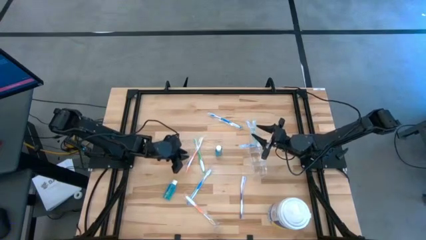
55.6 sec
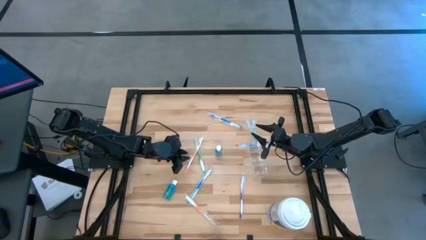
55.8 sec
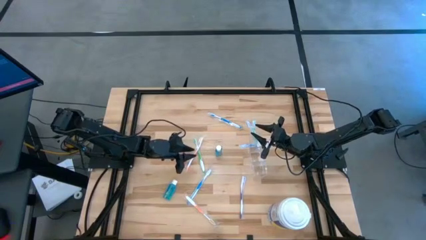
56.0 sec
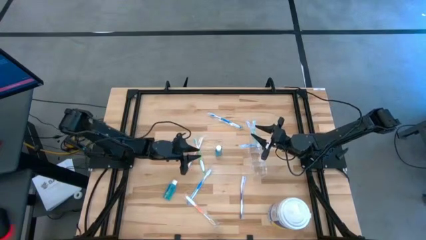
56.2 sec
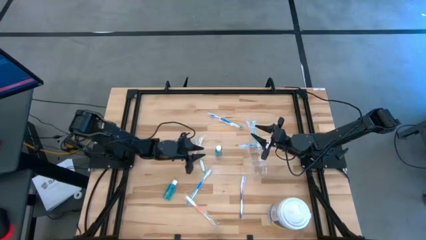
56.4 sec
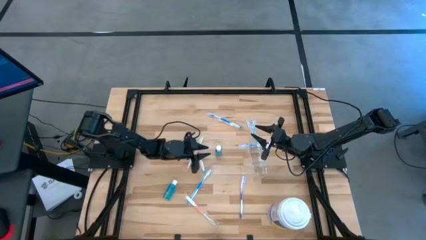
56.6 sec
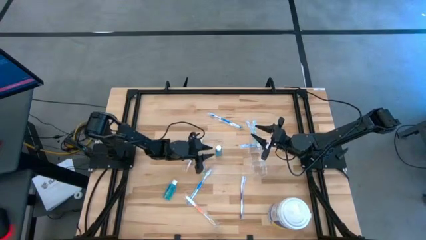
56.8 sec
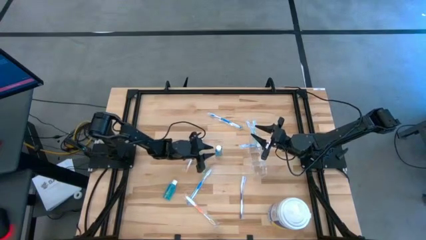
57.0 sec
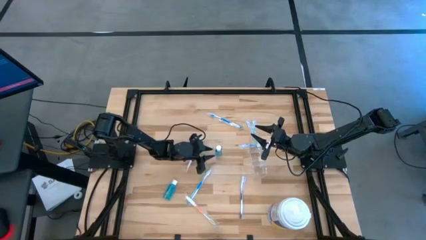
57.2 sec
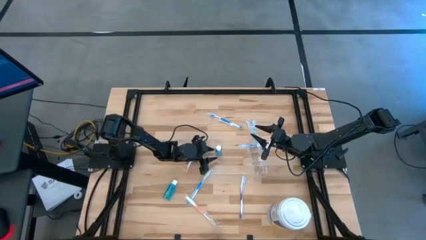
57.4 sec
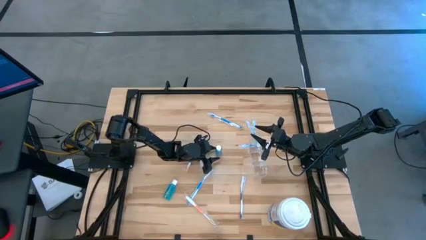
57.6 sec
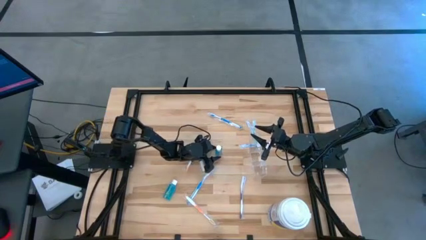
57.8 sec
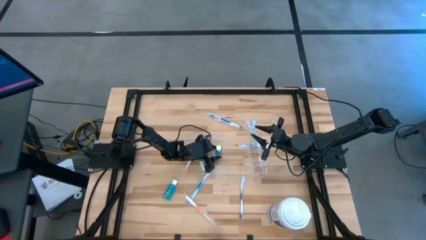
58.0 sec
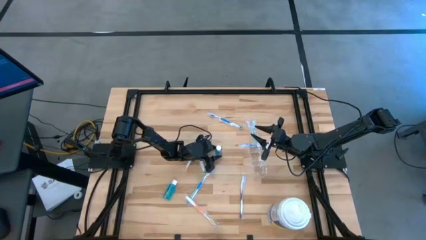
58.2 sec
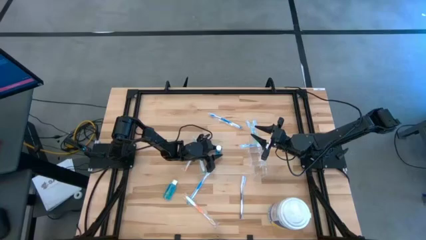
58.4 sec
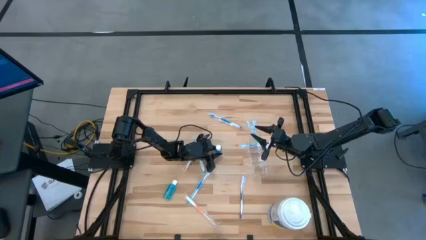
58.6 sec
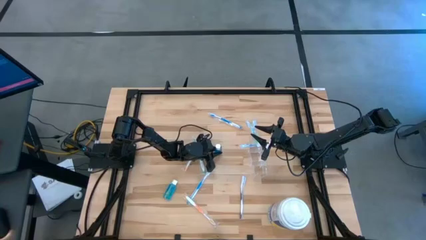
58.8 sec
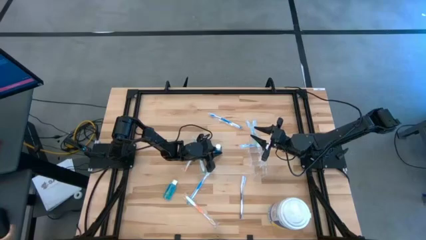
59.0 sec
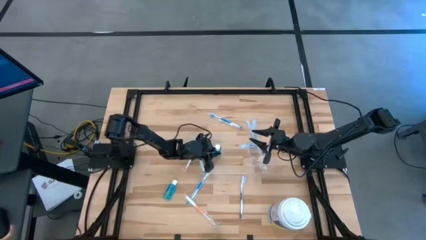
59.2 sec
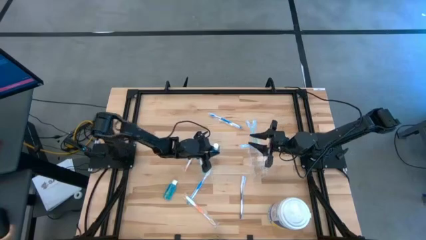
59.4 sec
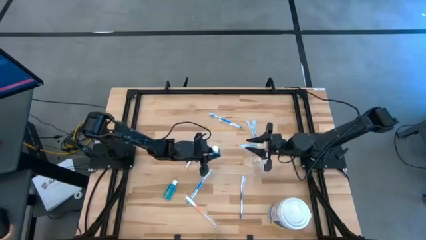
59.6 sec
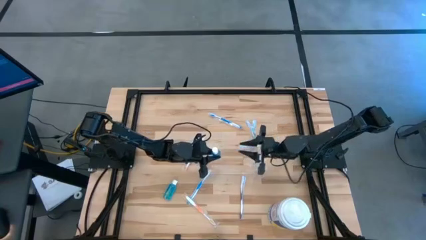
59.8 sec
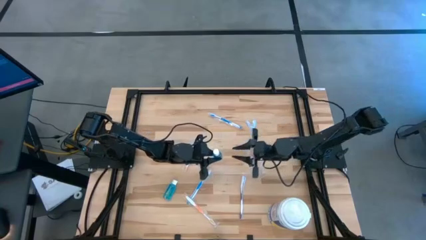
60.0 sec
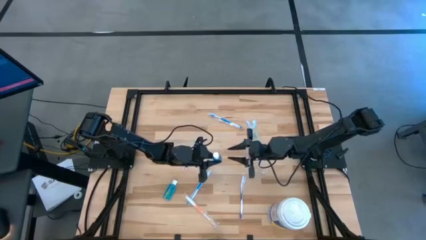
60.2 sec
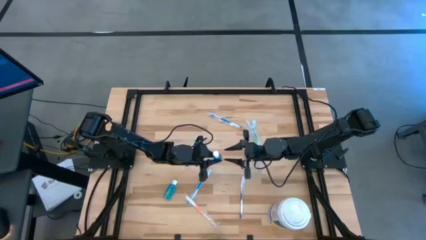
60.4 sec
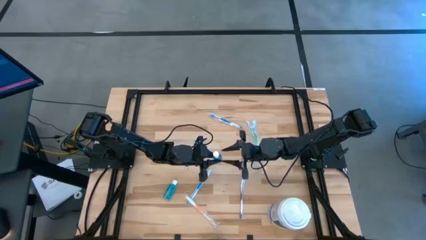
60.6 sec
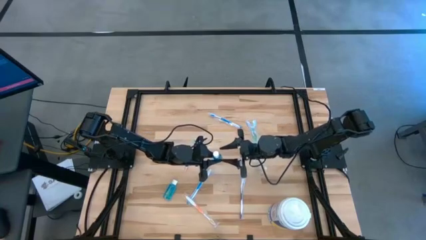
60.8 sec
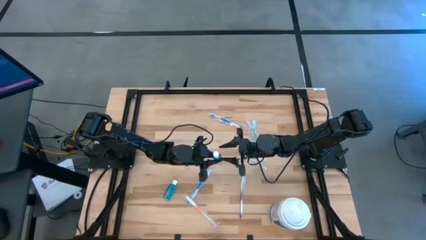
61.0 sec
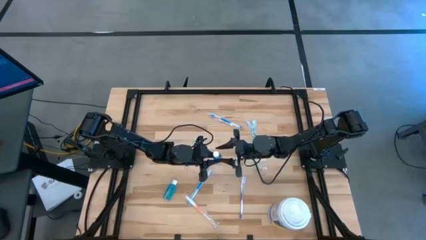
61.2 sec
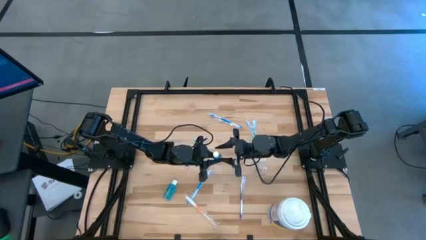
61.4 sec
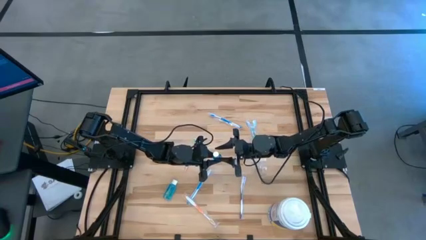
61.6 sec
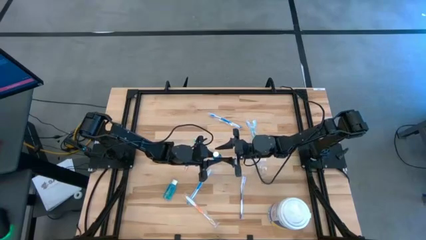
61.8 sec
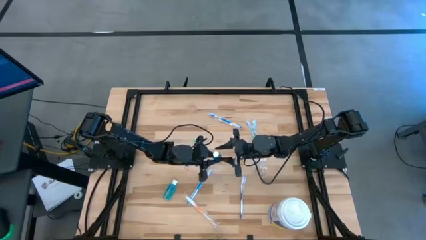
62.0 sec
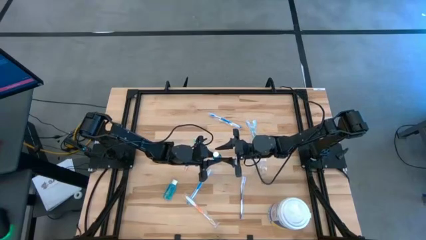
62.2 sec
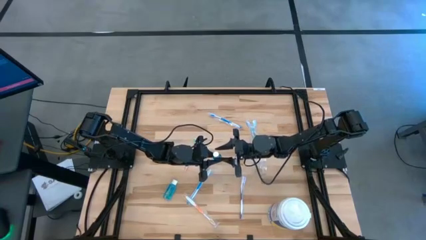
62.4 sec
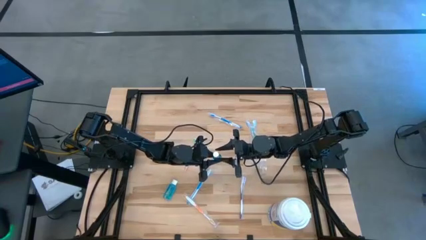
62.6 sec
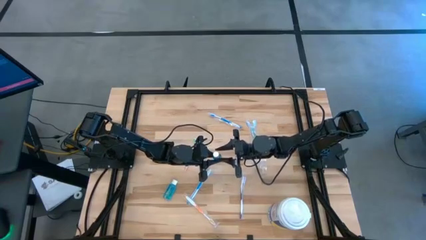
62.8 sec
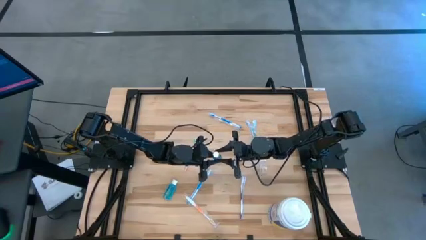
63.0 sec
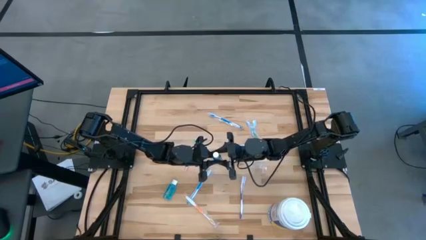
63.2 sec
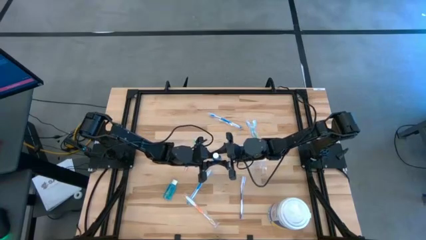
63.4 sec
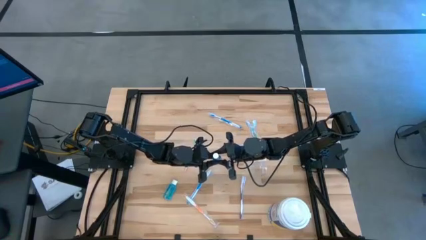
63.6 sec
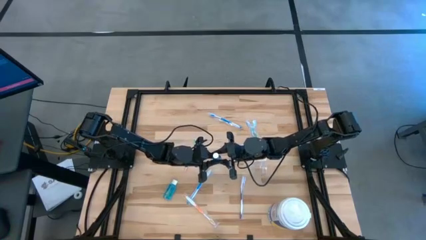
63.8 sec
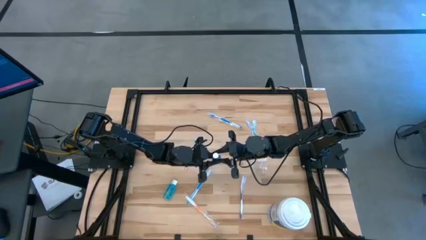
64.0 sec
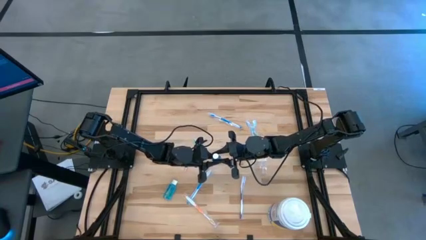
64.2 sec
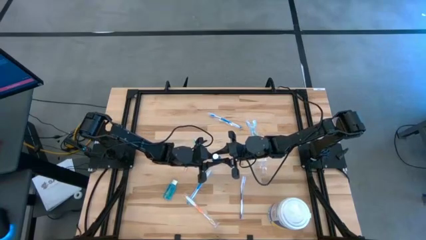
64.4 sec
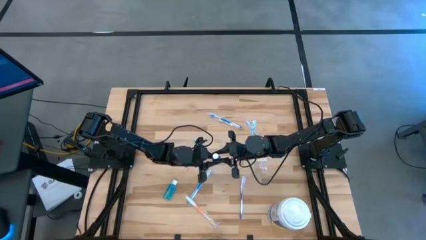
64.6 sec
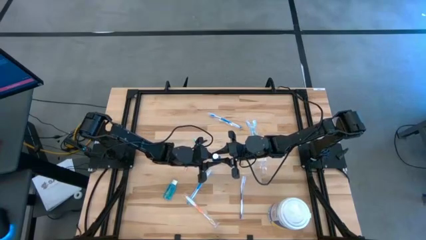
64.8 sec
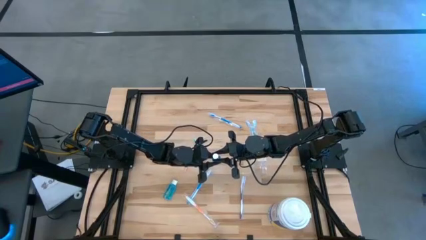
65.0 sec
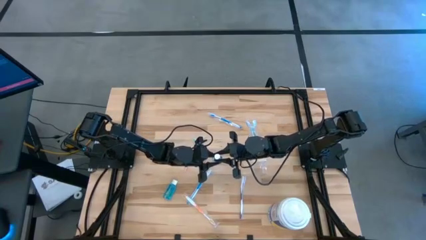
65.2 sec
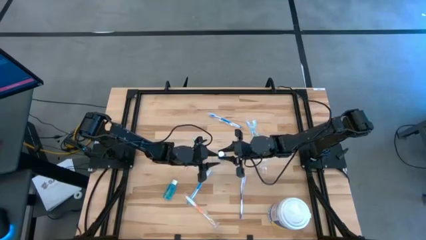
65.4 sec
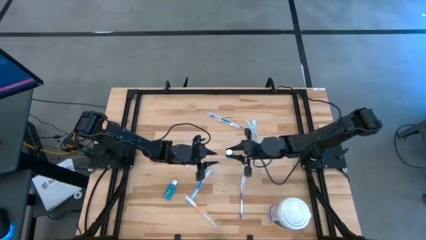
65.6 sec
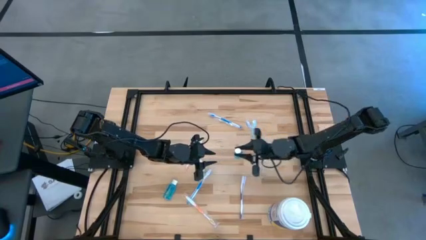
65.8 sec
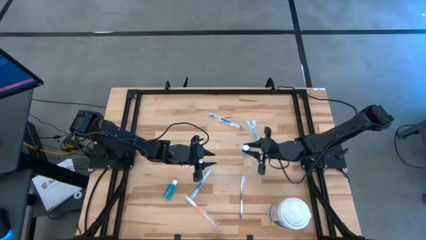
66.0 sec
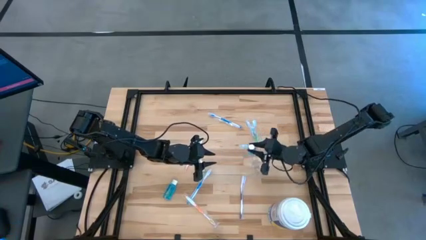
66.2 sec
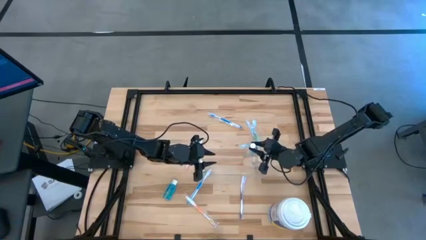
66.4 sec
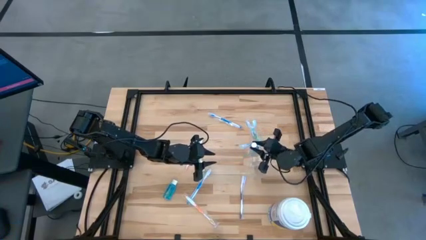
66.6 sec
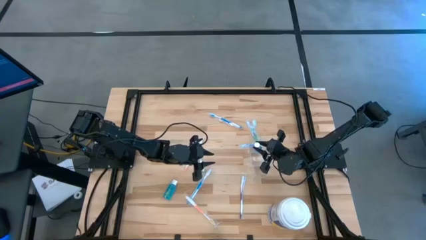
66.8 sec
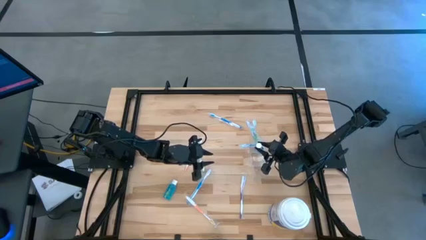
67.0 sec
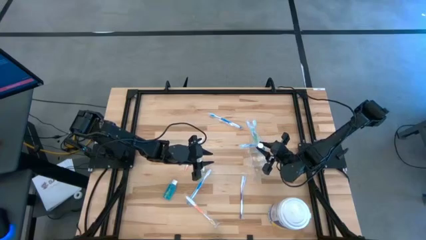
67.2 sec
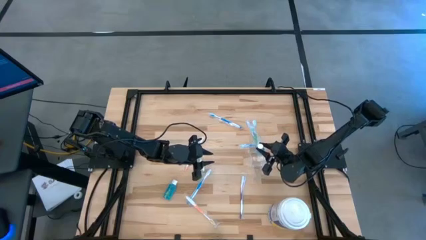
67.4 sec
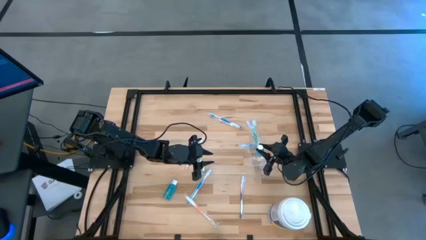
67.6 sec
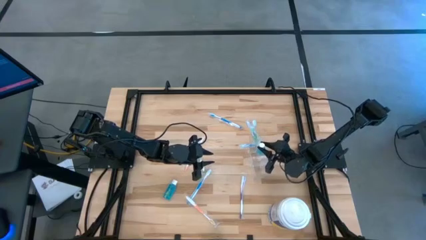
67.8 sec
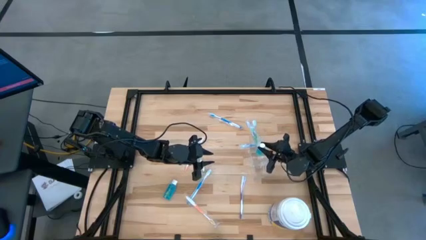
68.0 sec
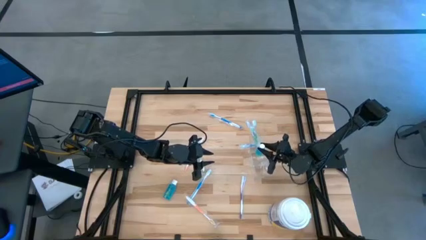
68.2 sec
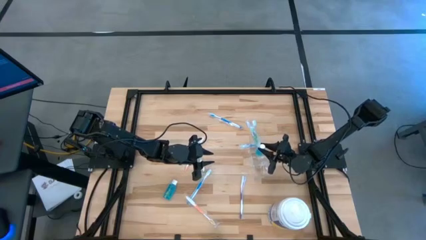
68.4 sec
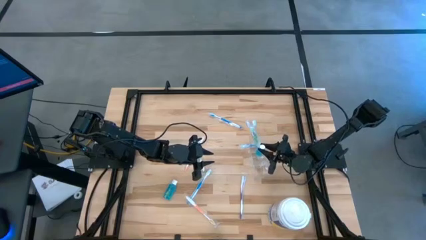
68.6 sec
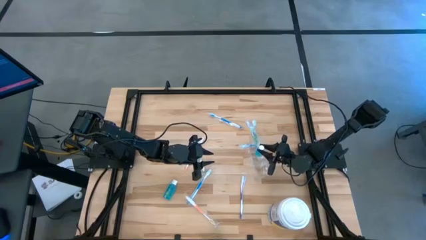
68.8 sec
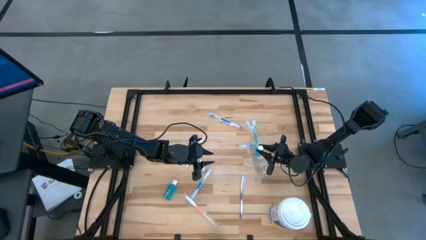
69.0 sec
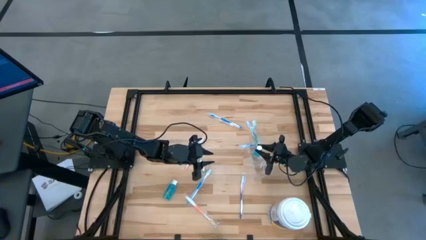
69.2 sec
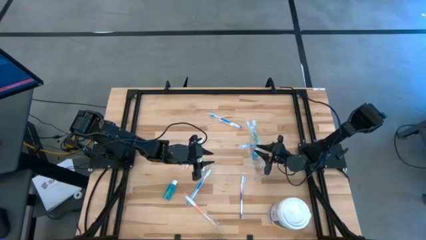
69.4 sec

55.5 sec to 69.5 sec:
Task: Pick & Place toothbrushing station
Put the top blue mouthwash into the transparent organizer
